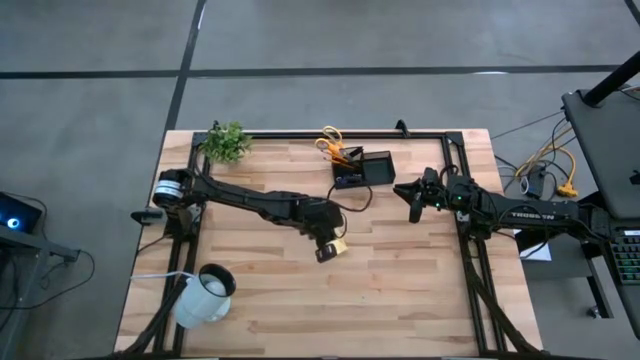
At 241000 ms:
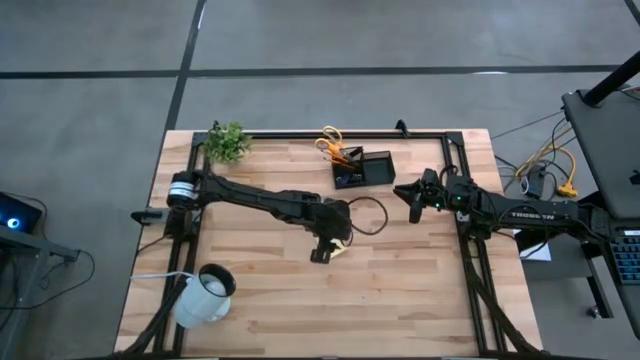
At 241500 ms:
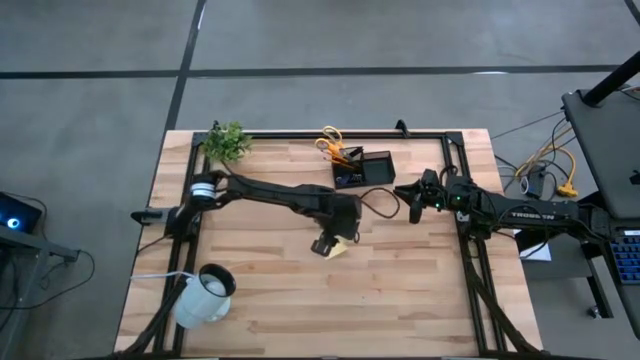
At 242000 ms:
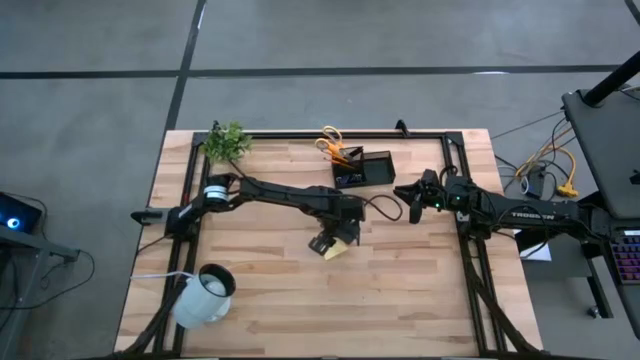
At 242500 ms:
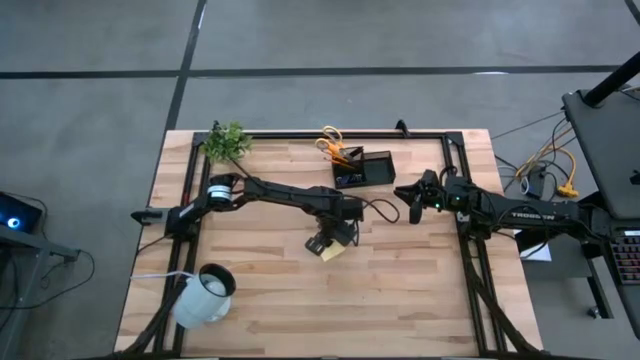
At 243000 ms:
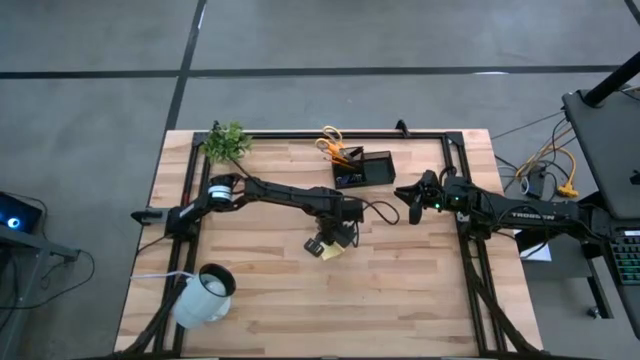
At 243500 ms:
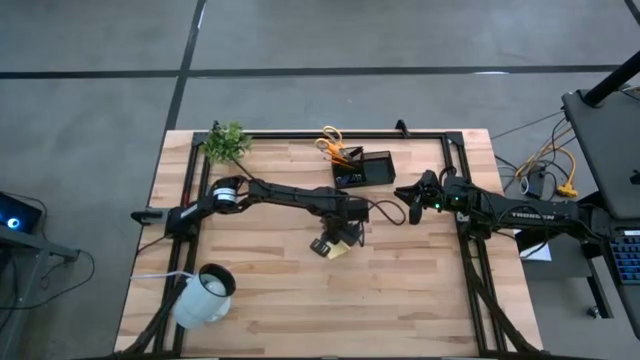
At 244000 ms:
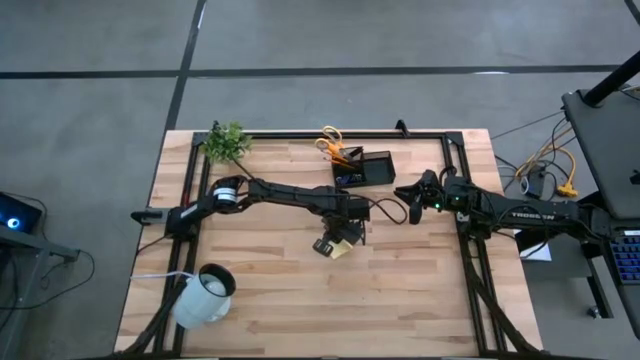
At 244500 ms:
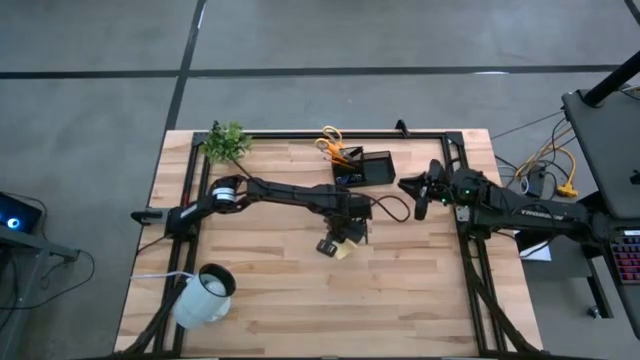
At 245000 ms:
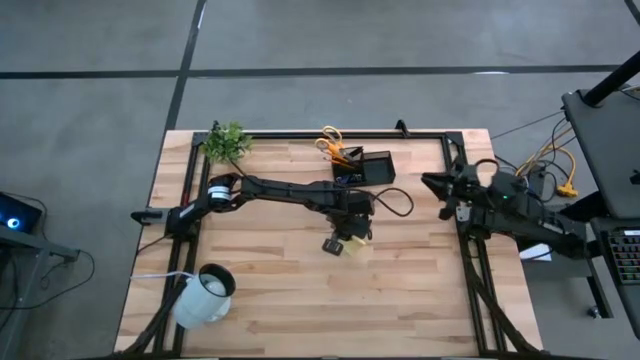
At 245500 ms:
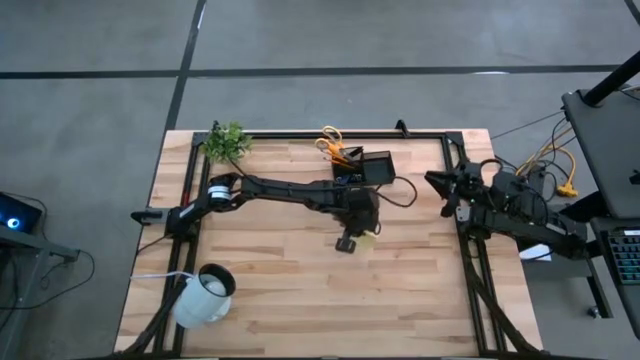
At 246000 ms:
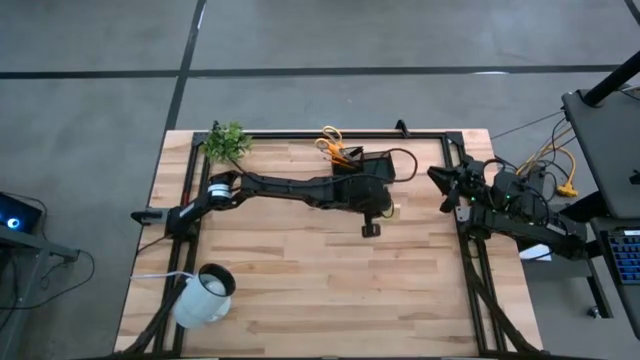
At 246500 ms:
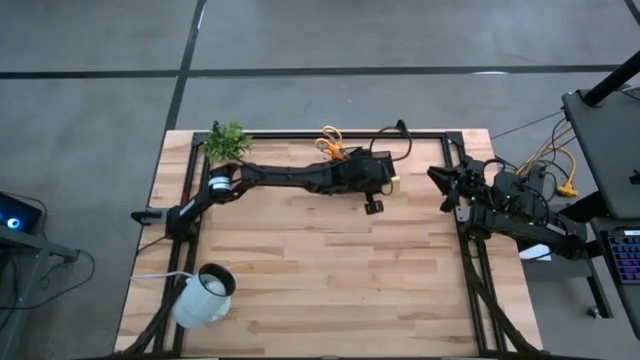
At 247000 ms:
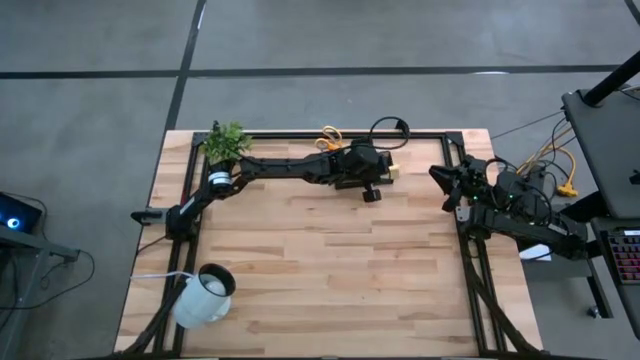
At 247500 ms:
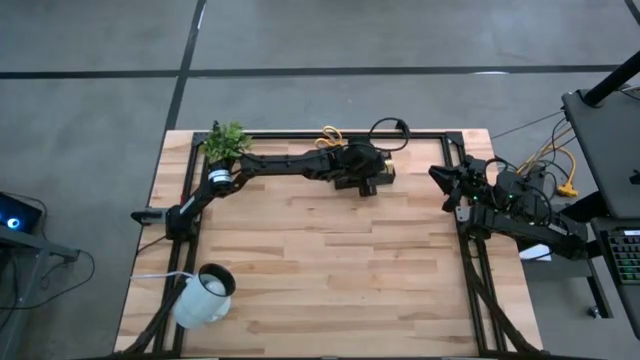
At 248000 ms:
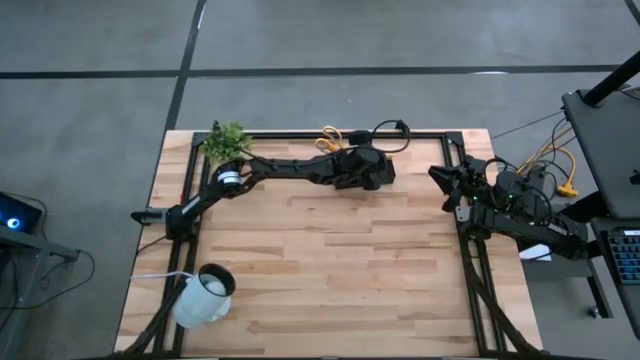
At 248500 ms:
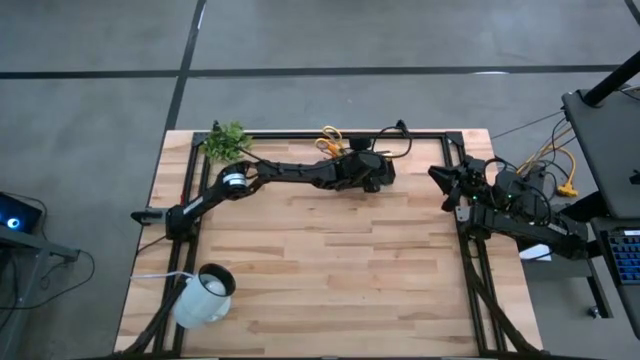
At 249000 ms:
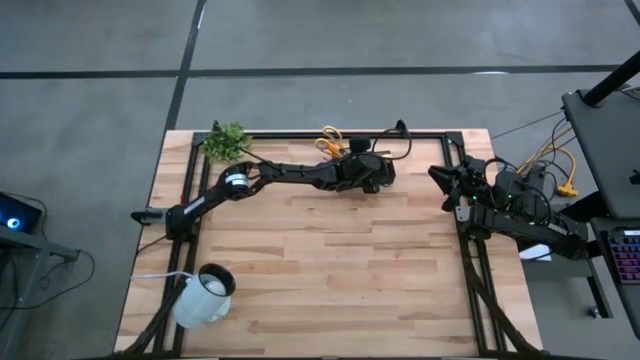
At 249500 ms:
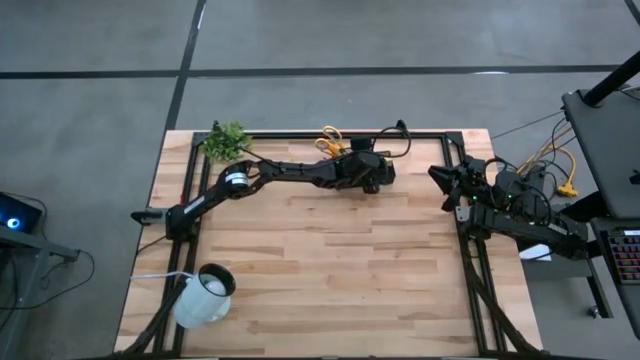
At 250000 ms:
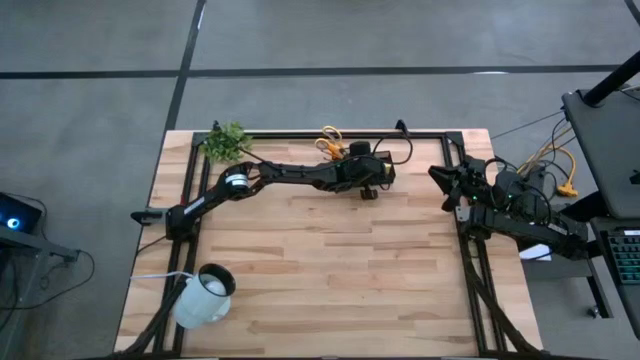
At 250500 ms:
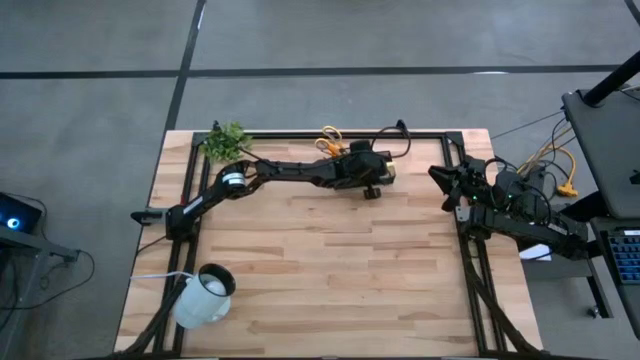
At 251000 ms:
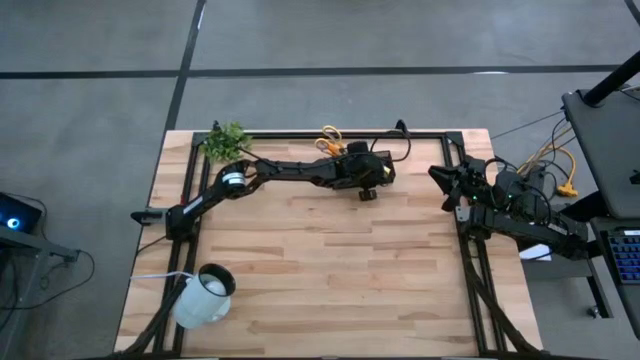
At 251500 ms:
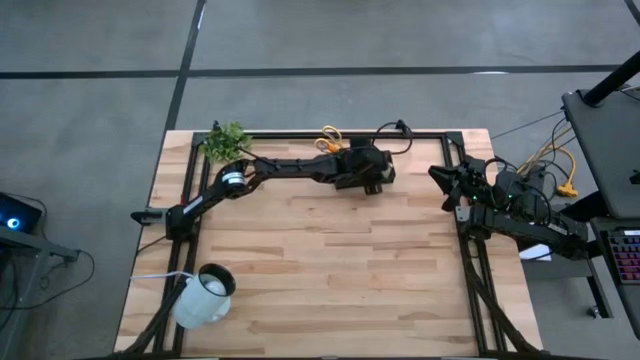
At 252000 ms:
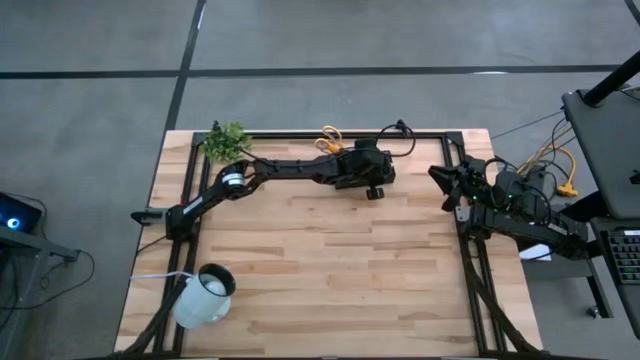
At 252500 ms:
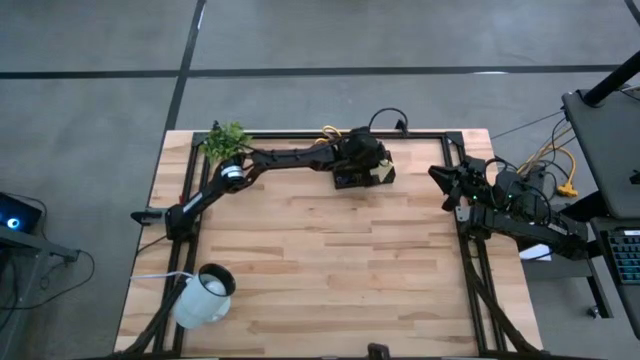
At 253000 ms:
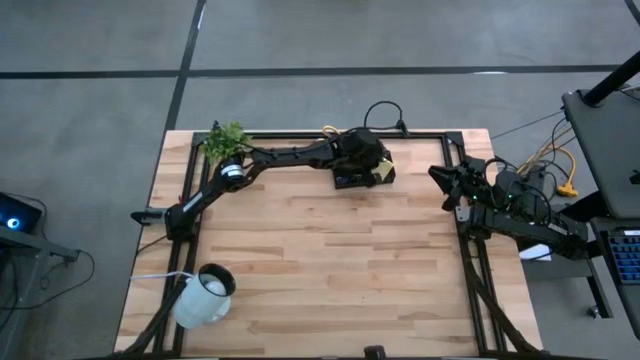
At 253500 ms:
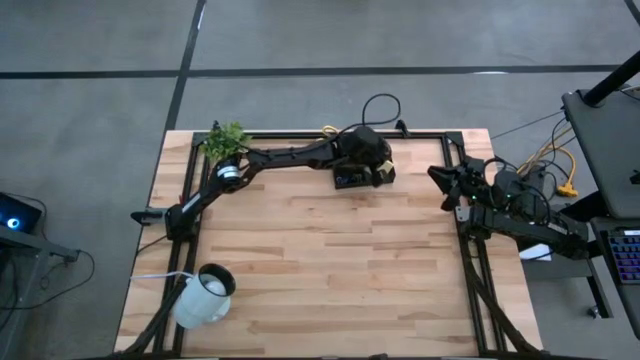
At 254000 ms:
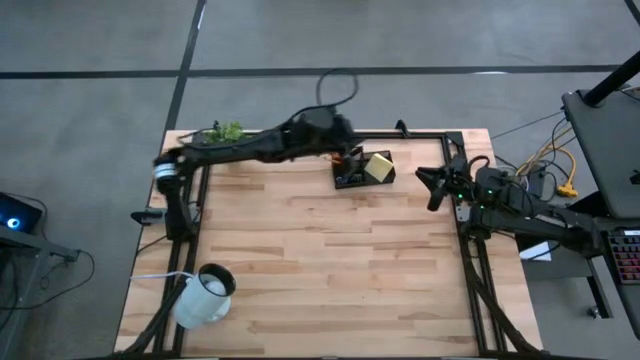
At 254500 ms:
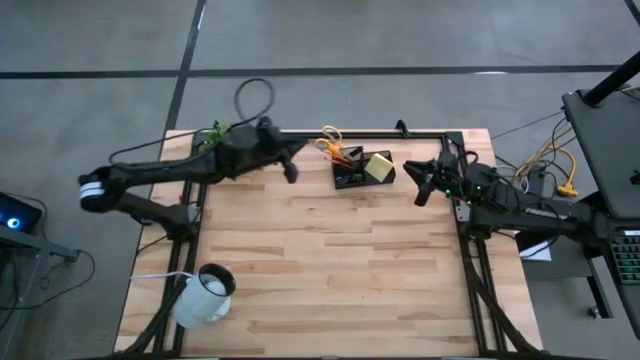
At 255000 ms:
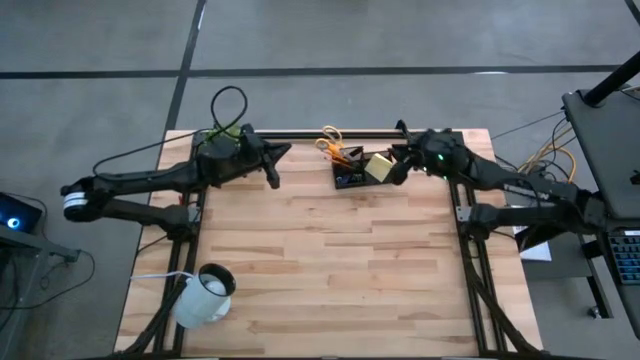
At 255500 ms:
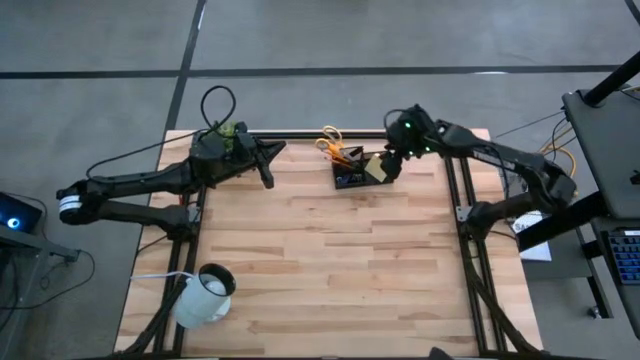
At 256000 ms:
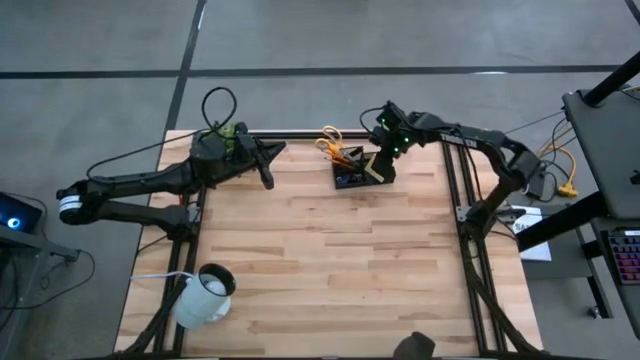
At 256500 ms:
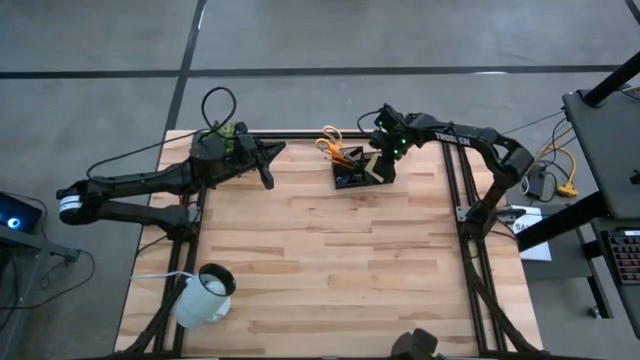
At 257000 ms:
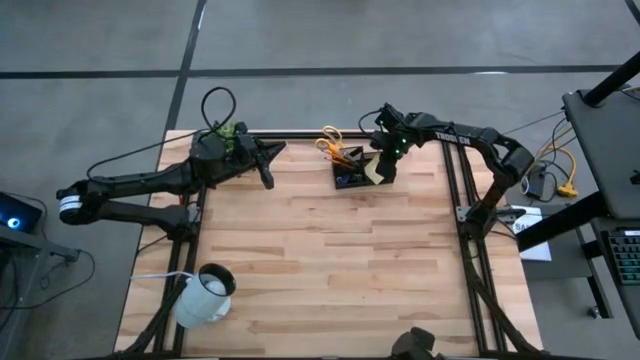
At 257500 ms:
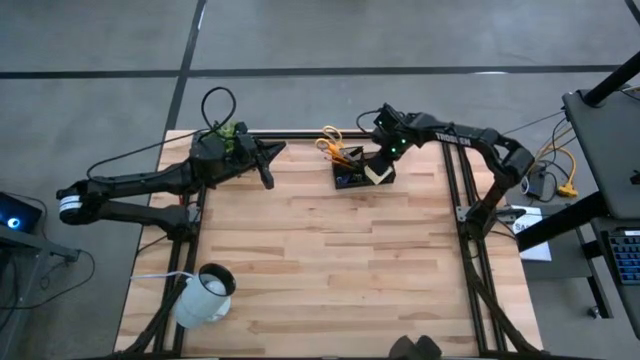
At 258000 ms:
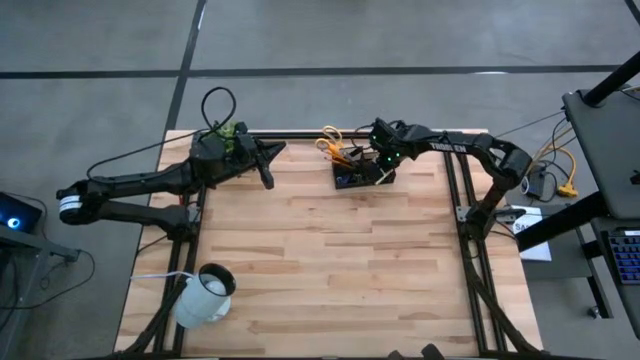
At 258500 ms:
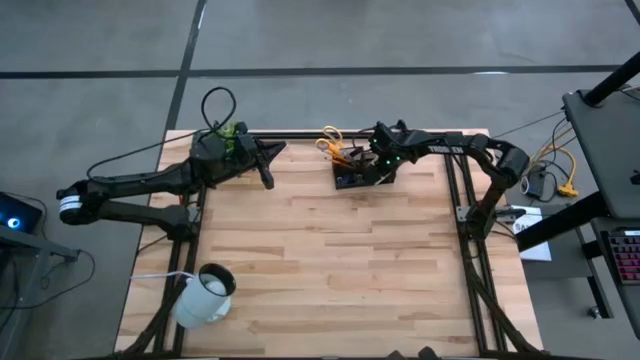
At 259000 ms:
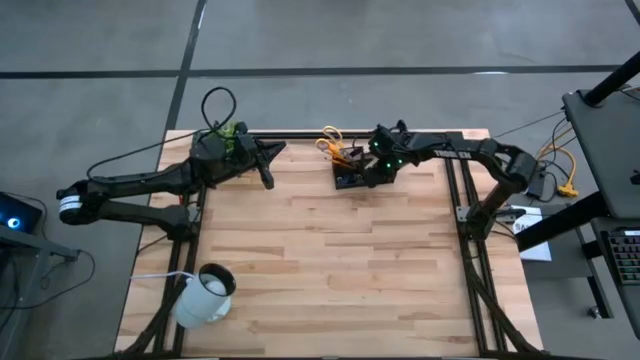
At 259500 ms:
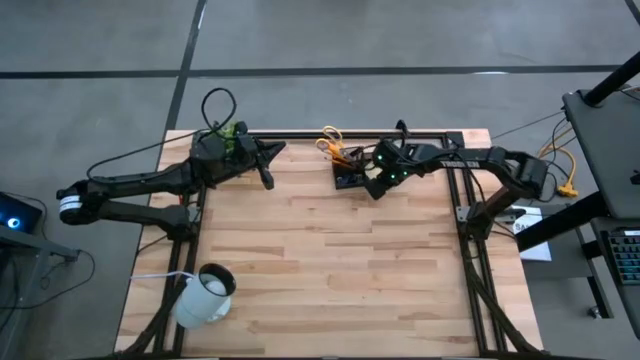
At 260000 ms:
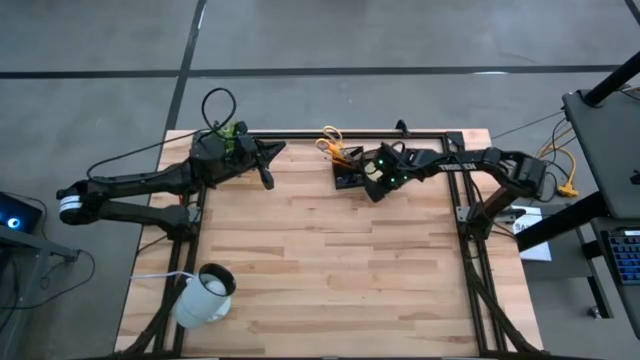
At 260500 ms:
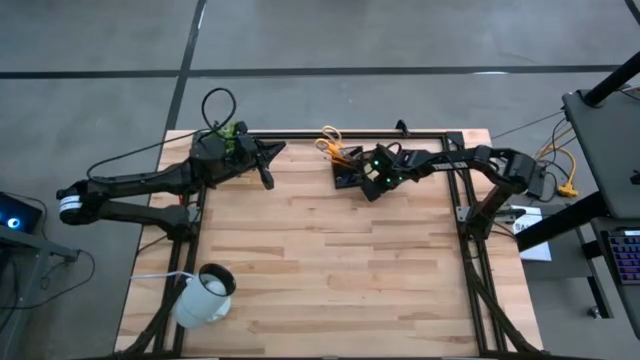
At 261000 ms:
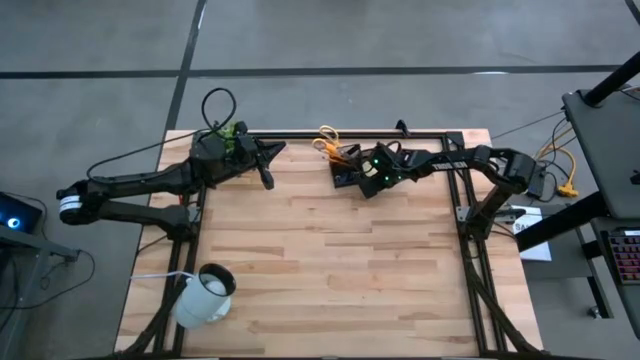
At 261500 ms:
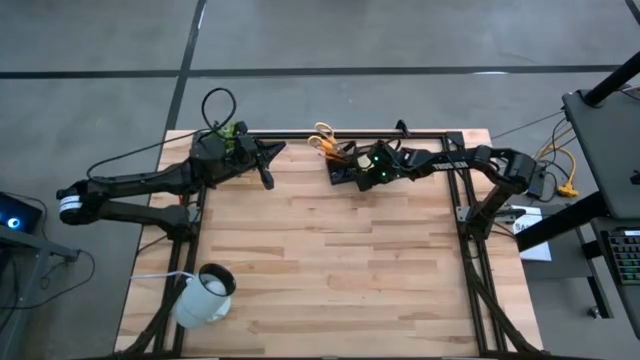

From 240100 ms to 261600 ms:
Task: Pick and place office supplies into organizer
Put the sticky note into the desk organizer
